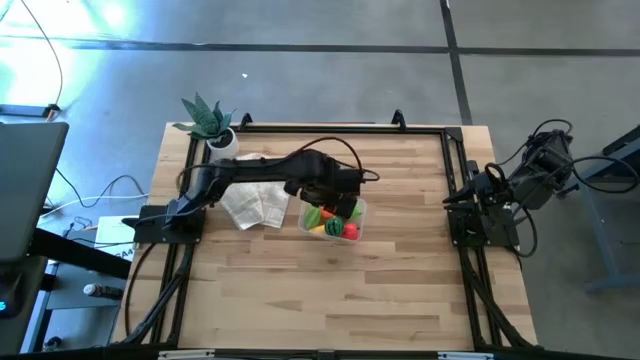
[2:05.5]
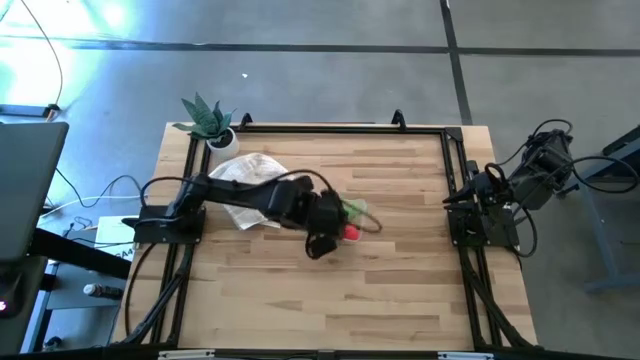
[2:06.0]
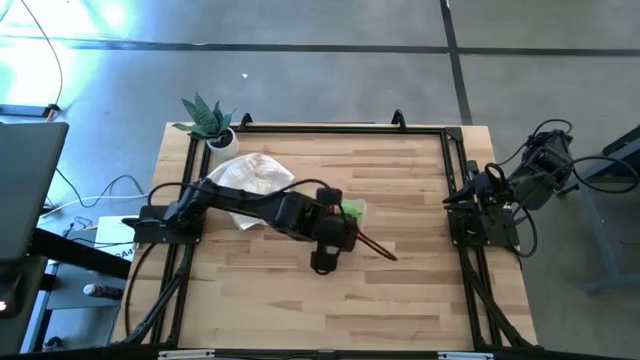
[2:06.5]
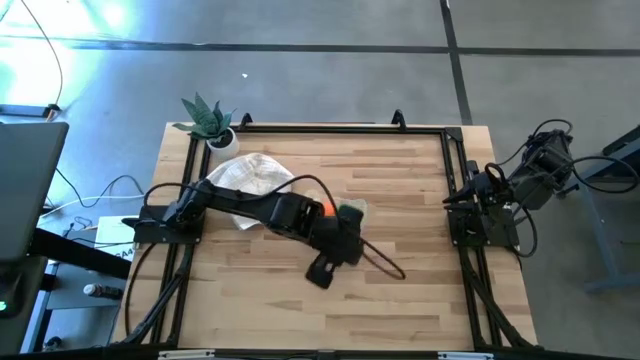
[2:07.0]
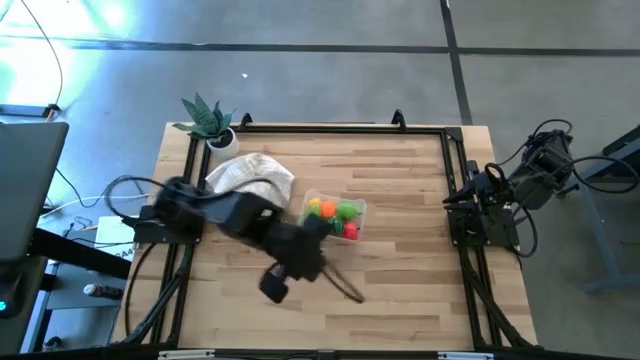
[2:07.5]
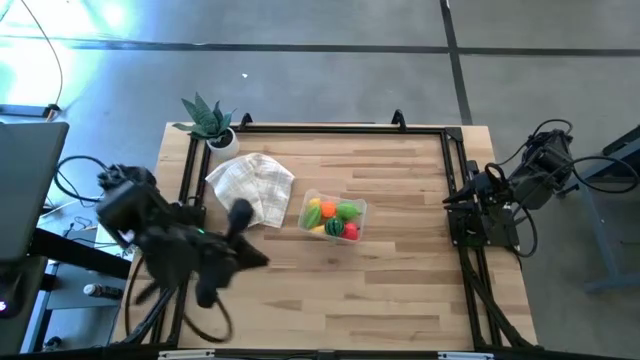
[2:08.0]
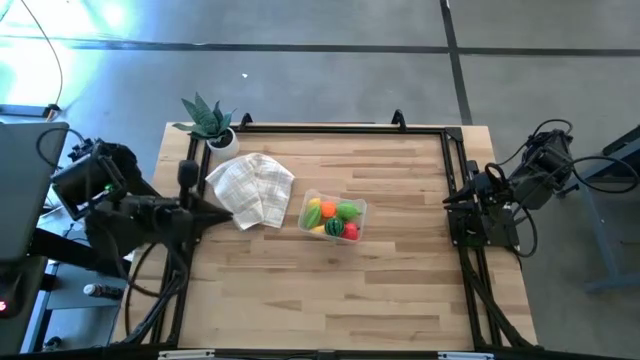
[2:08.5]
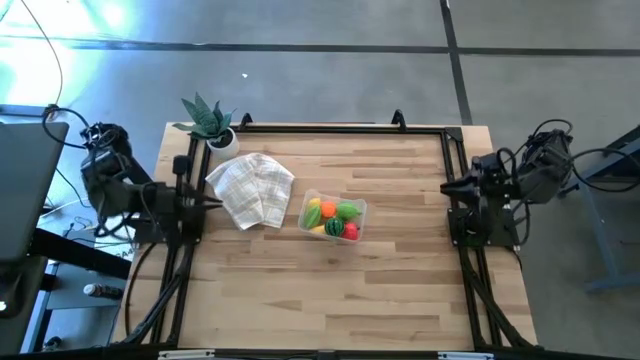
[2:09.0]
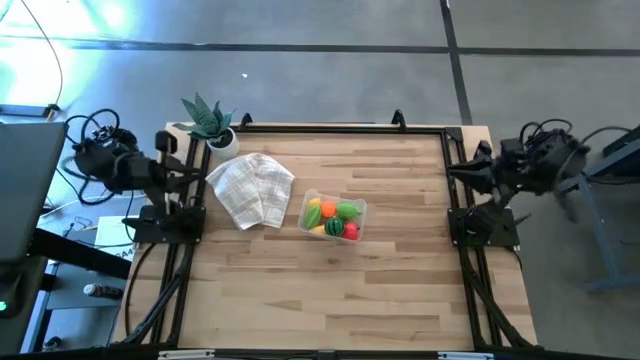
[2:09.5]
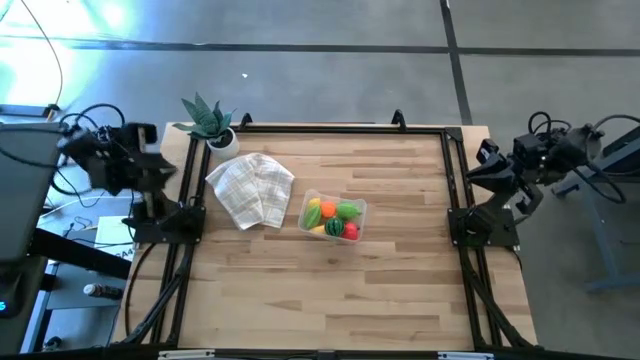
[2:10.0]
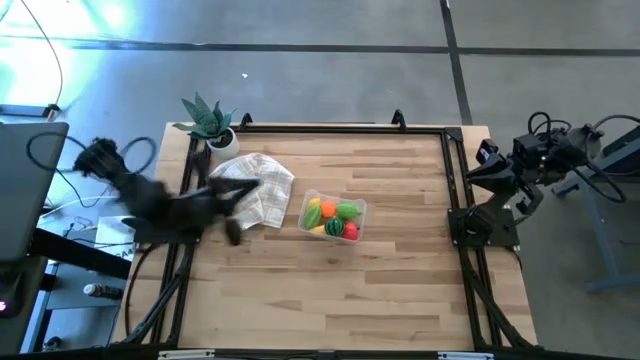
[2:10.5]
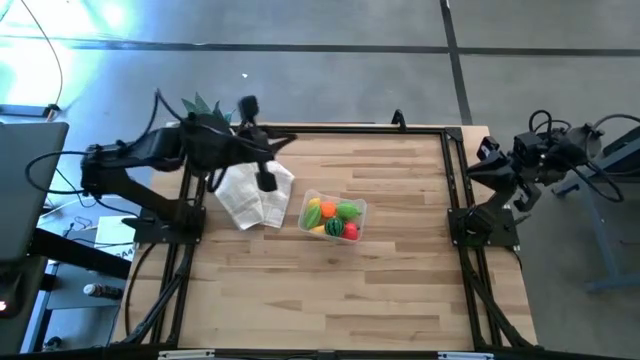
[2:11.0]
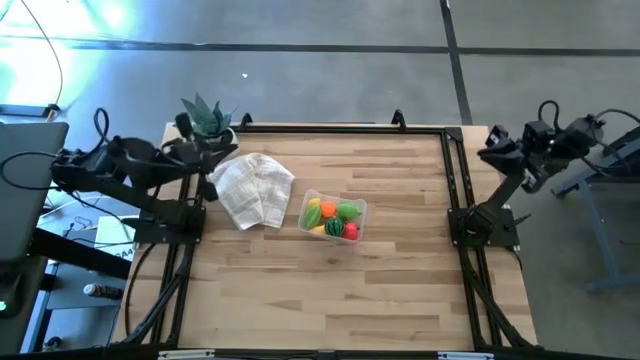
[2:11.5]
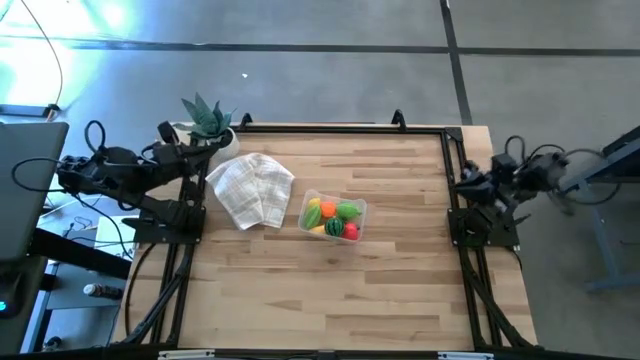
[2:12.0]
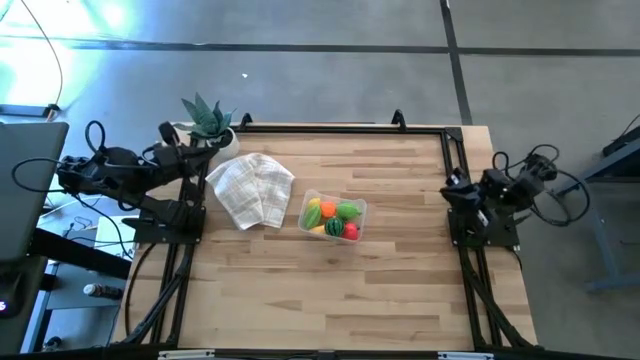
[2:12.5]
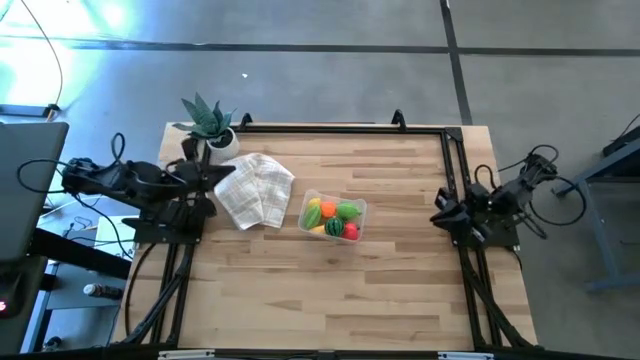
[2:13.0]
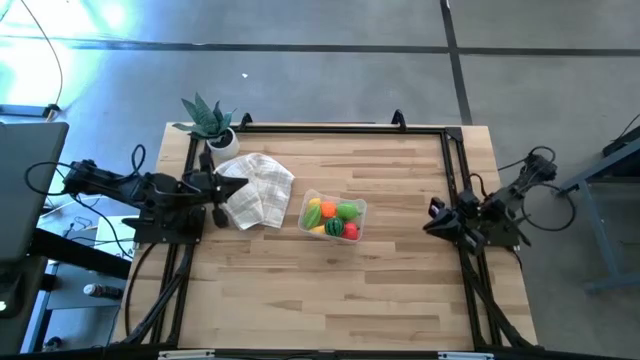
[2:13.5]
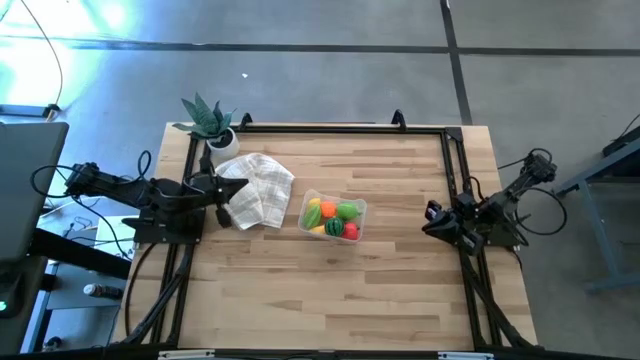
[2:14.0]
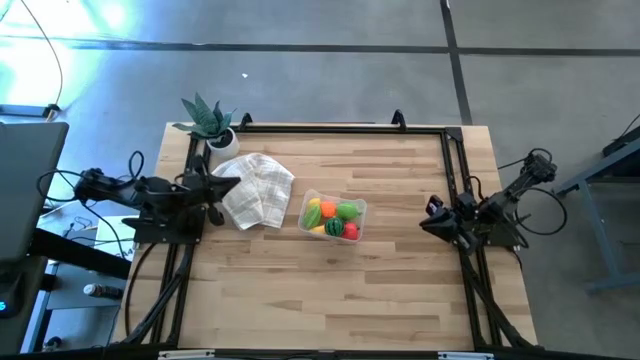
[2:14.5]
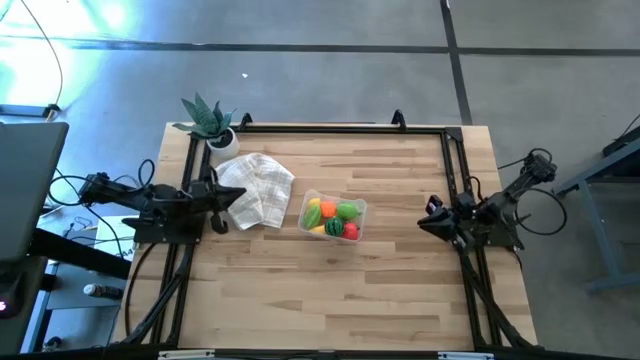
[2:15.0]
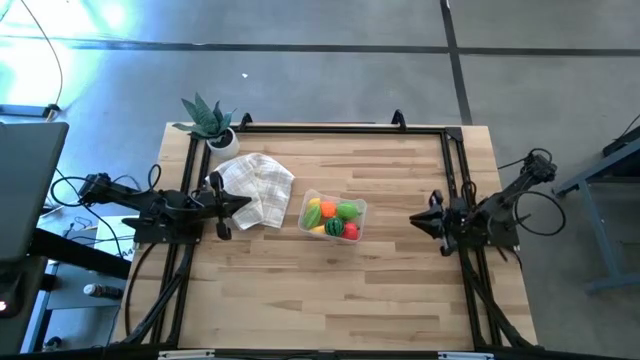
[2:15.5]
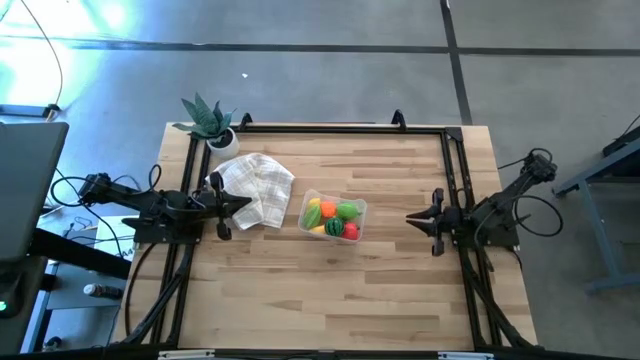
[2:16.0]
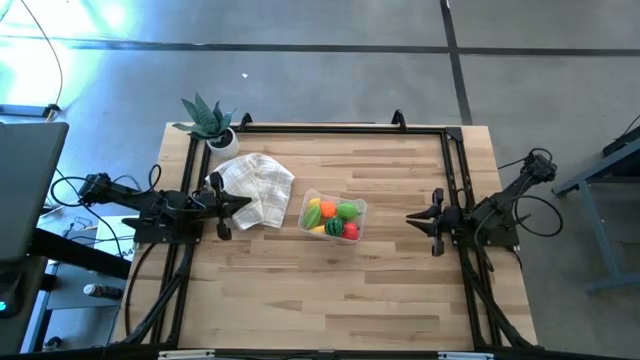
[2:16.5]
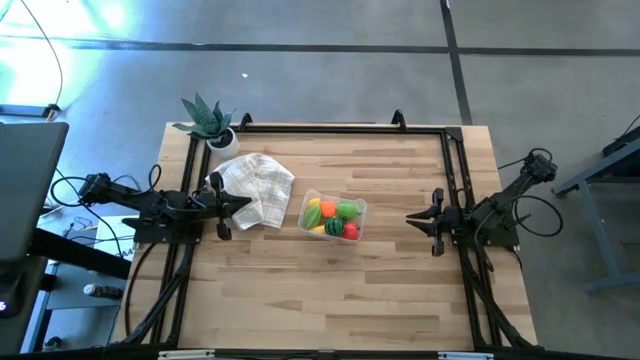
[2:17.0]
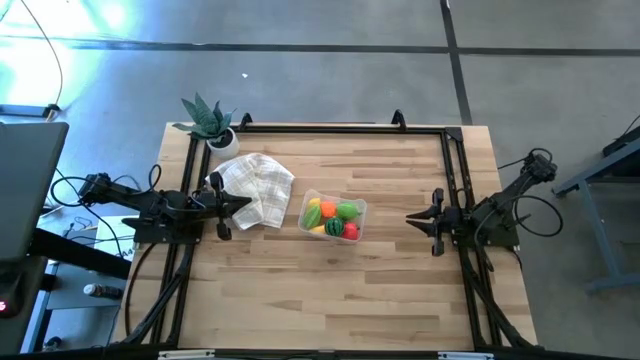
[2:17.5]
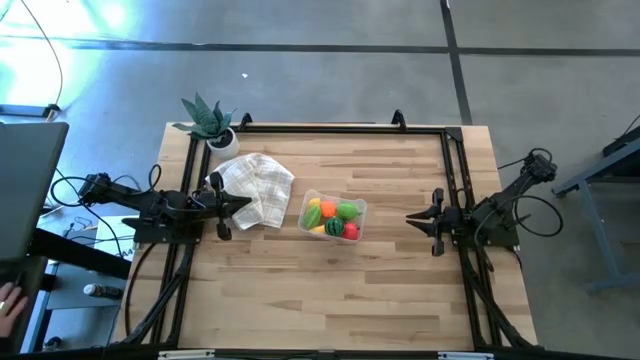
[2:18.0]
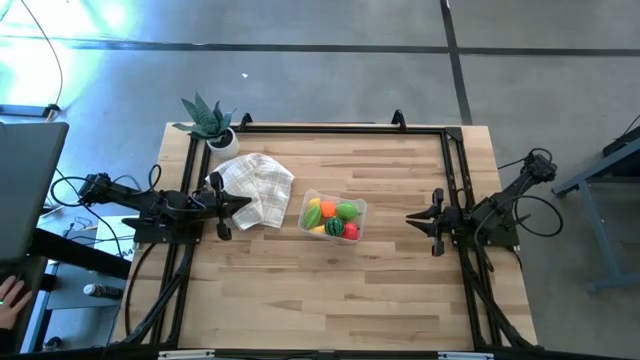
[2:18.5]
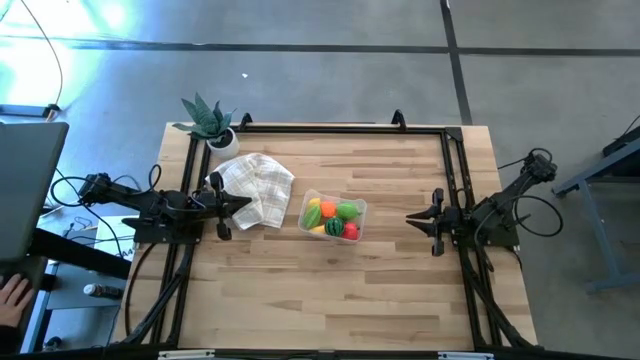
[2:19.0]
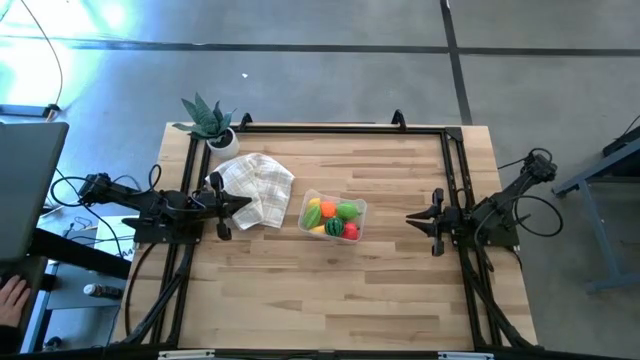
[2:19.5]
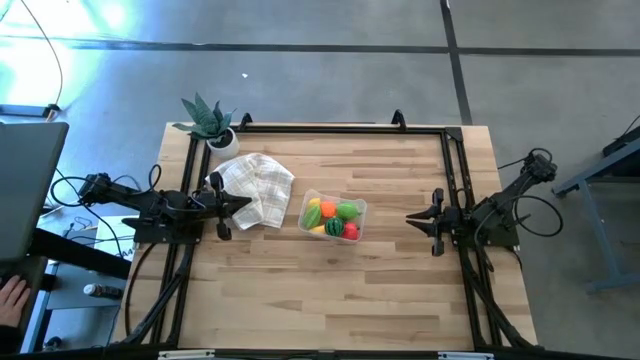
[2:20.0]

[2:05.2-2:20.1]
Task: Pick and placing Produce into tupperware
Return to Home Position

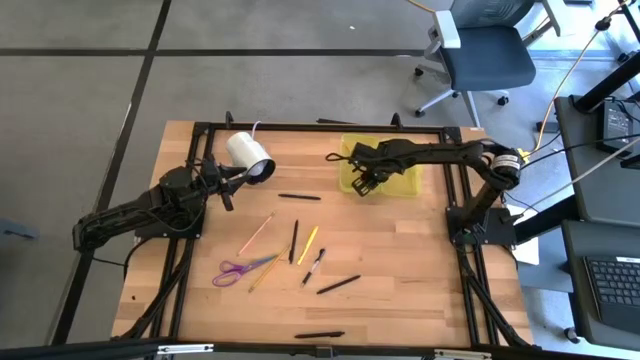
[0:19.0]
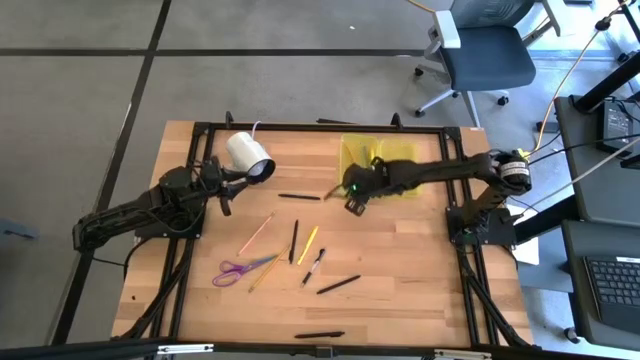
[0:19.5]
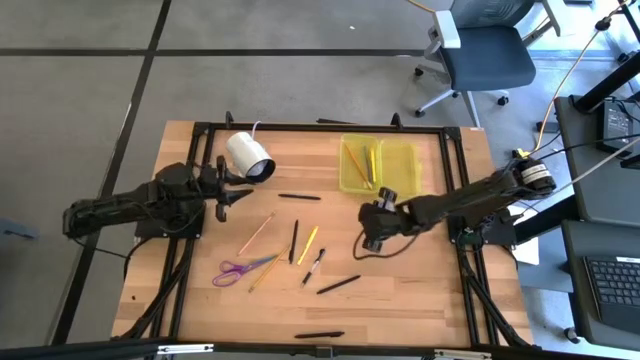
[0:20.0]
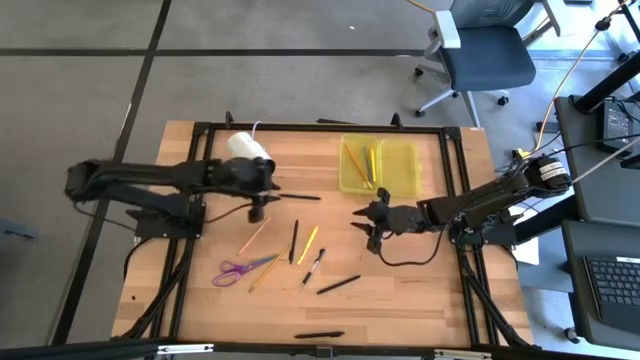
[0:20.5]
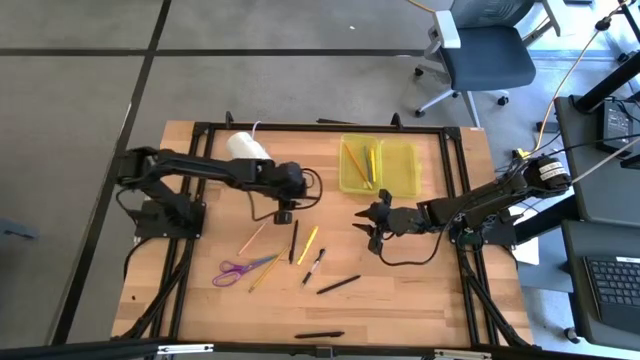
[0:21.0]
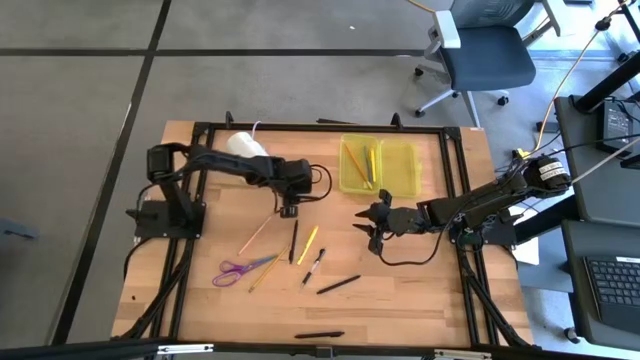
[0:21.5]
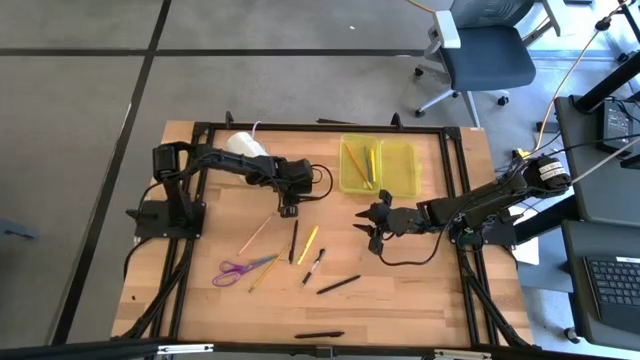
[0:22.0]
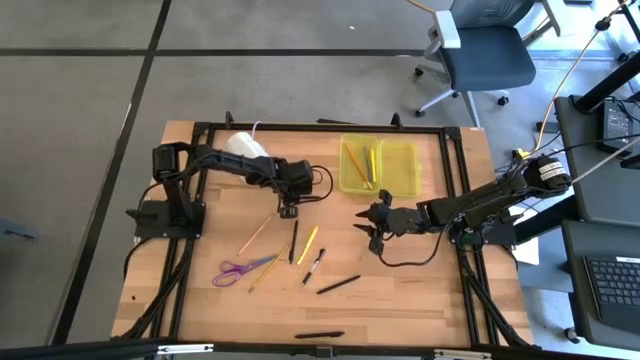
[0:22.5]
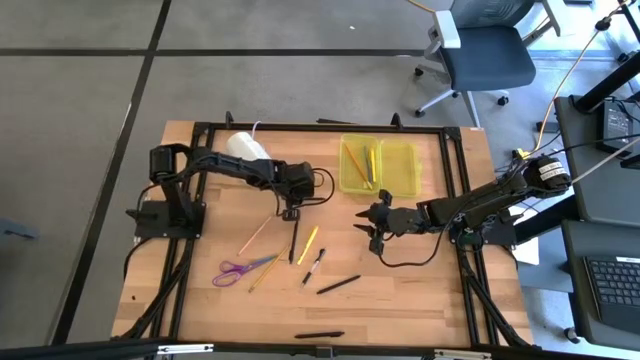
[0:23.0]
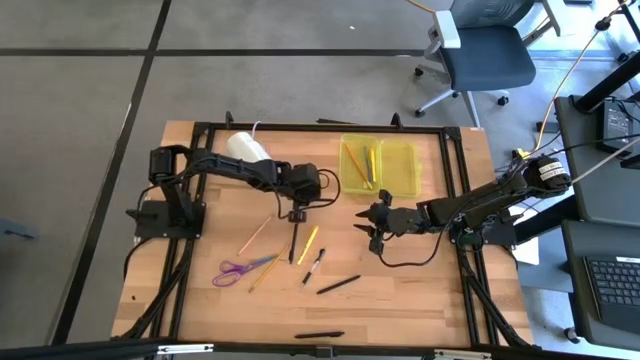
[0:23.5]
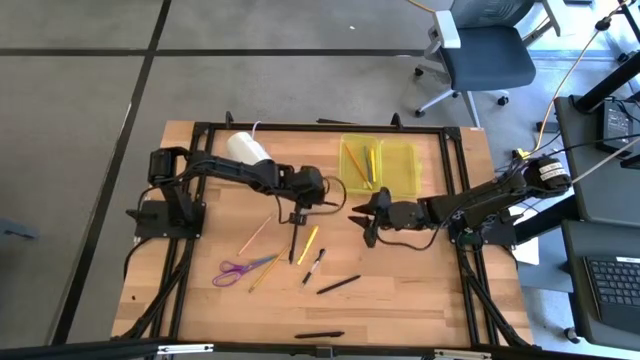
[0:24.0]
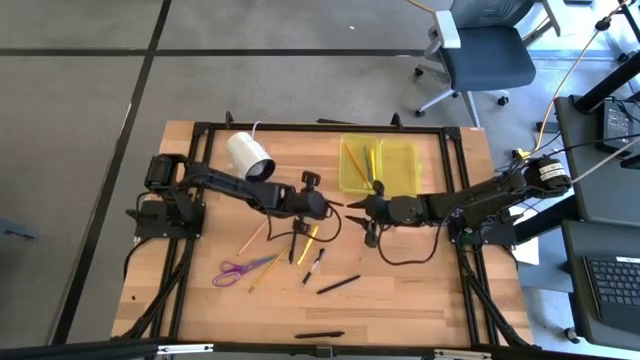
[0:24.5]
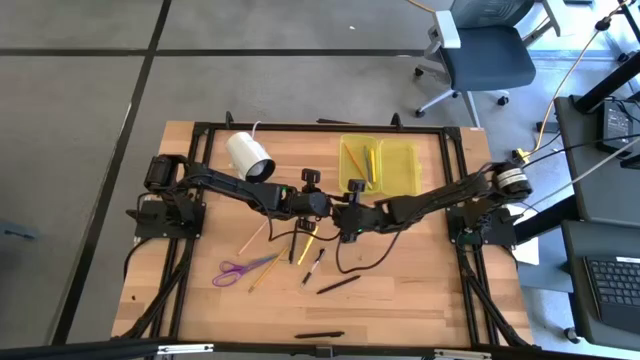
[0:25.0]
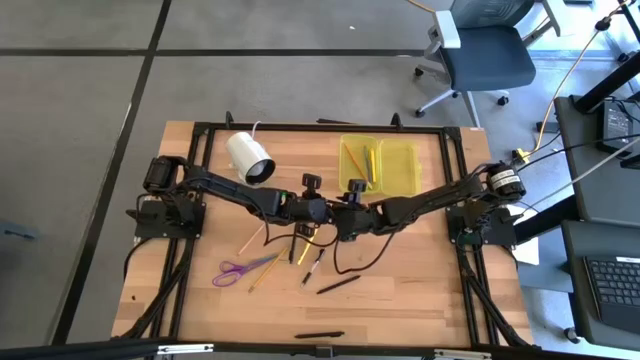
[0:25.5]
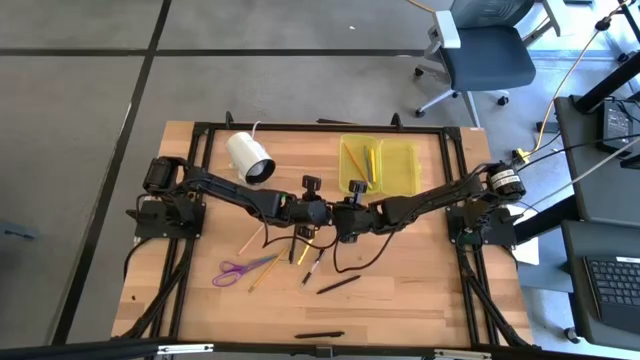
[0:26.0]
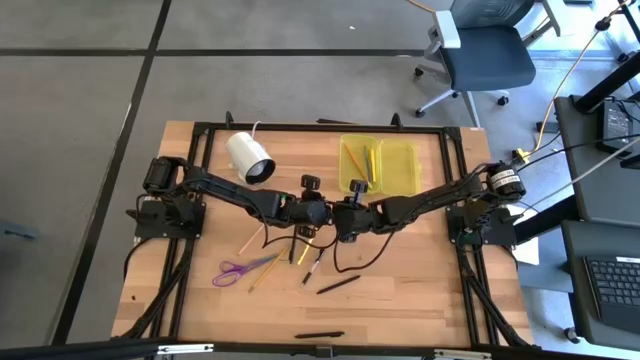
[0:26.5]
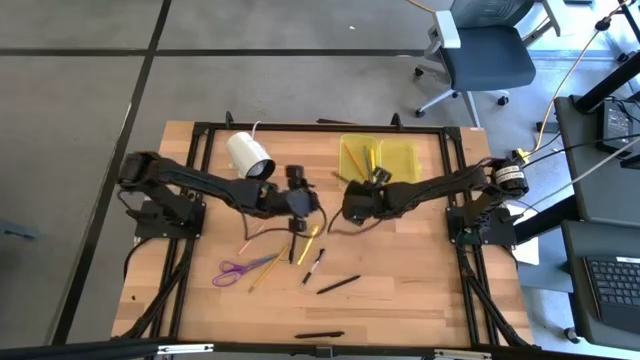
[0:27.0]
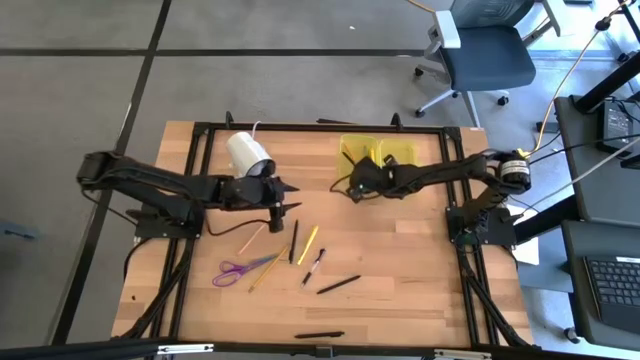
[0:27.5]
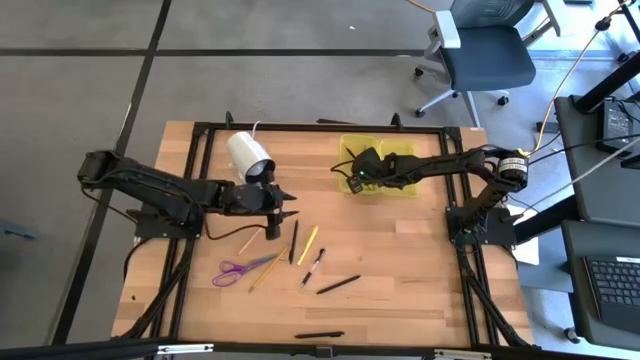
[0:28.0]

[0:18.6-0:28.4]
Task: Pick & place school supplies into a supply box
Put the black pen into the yellow supply box
